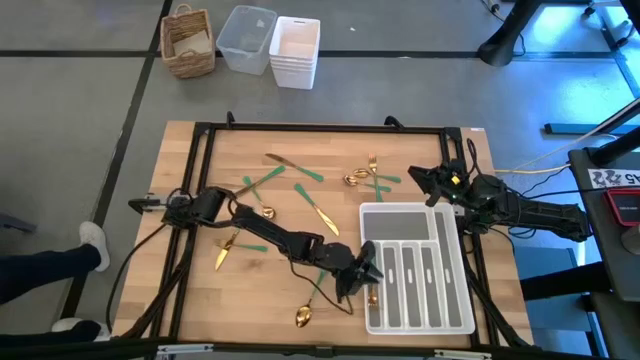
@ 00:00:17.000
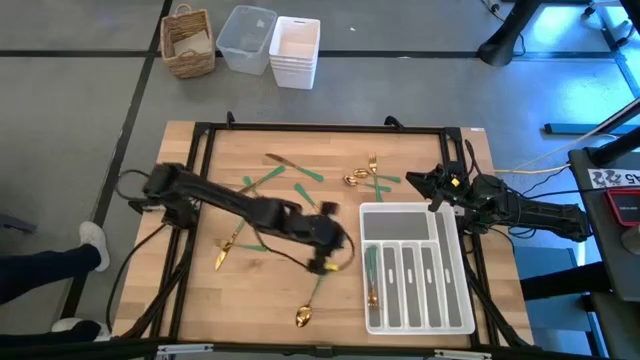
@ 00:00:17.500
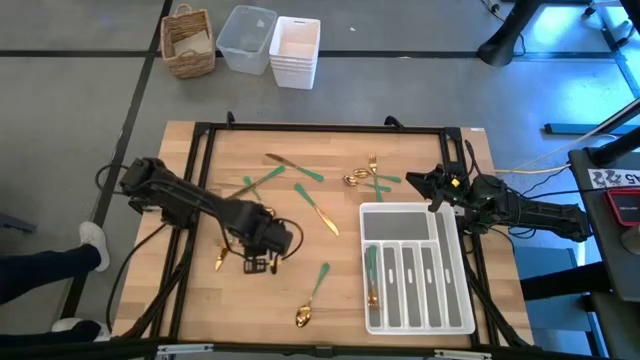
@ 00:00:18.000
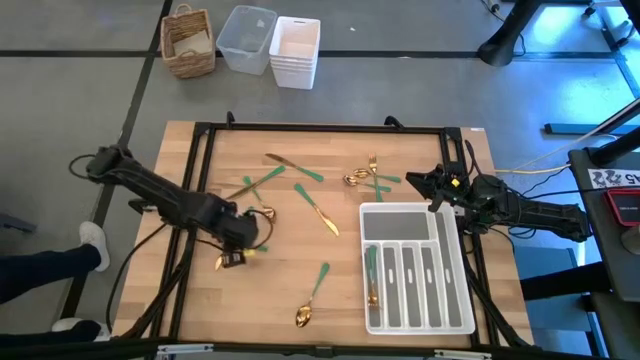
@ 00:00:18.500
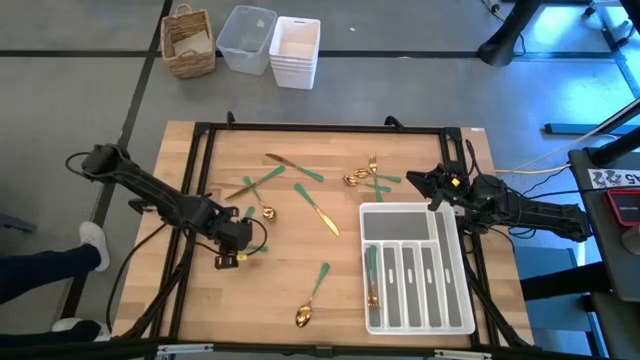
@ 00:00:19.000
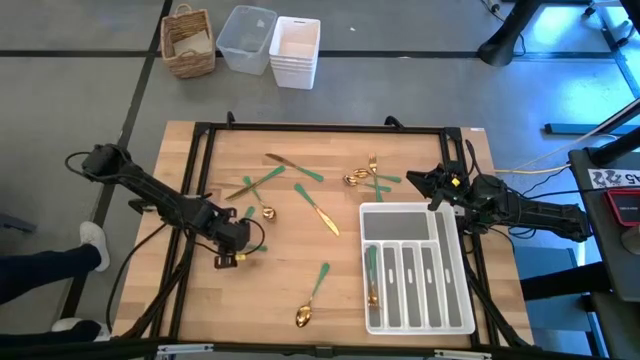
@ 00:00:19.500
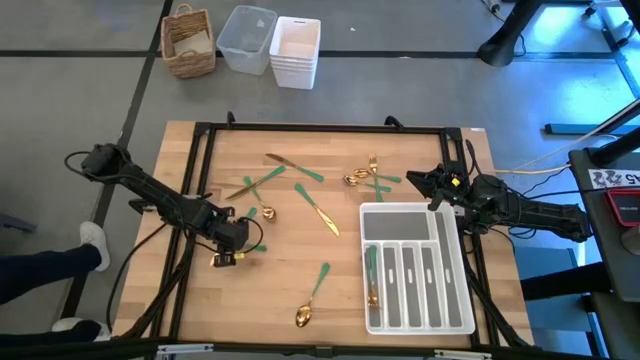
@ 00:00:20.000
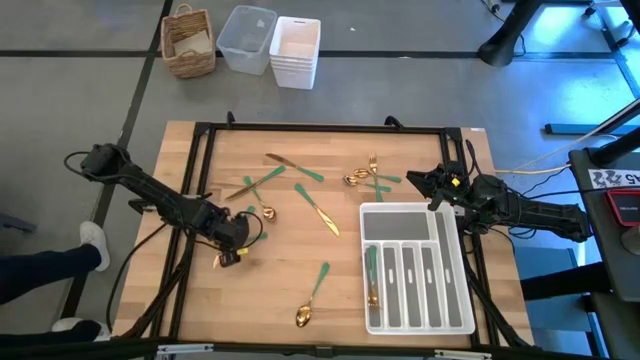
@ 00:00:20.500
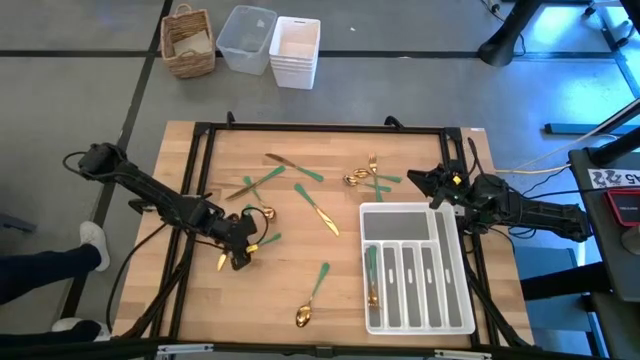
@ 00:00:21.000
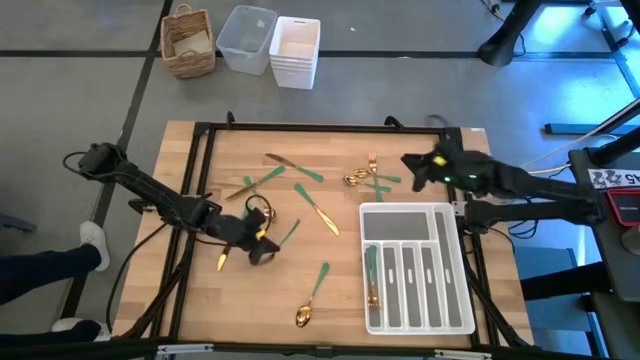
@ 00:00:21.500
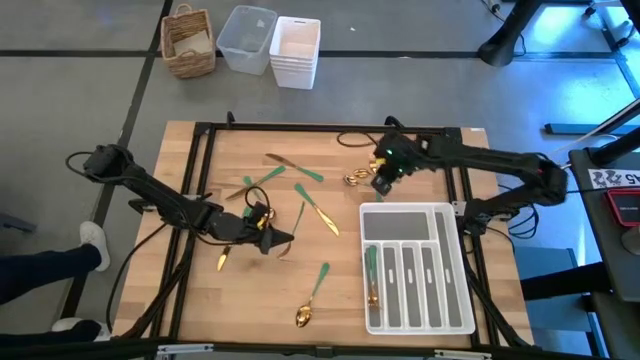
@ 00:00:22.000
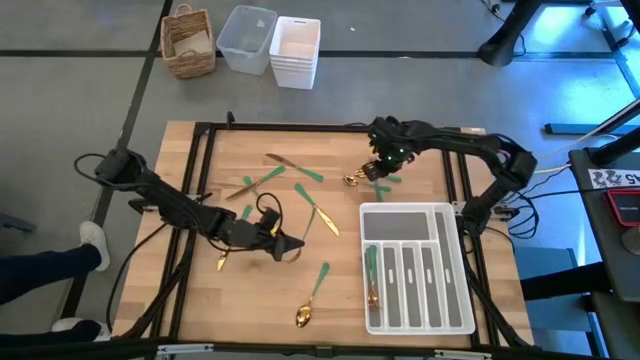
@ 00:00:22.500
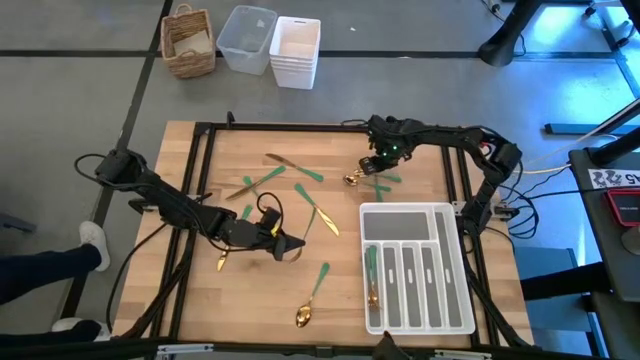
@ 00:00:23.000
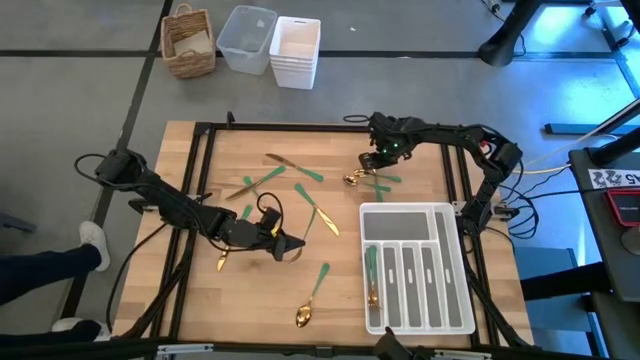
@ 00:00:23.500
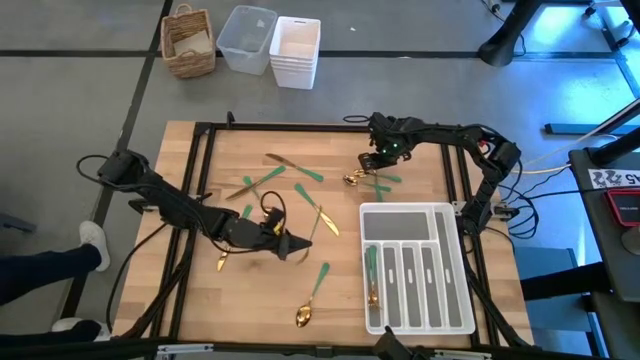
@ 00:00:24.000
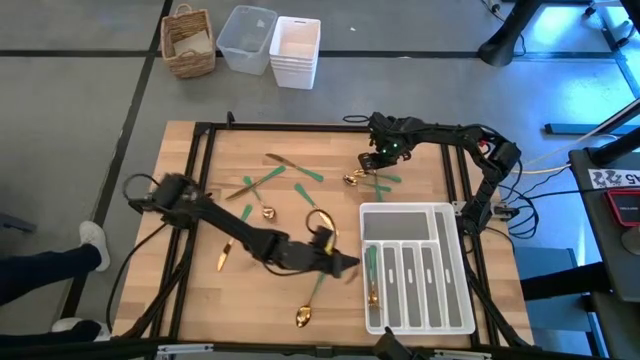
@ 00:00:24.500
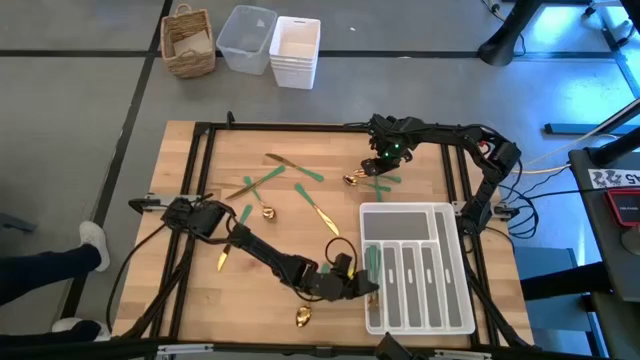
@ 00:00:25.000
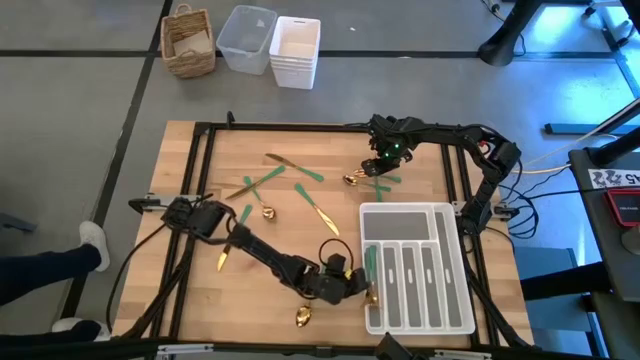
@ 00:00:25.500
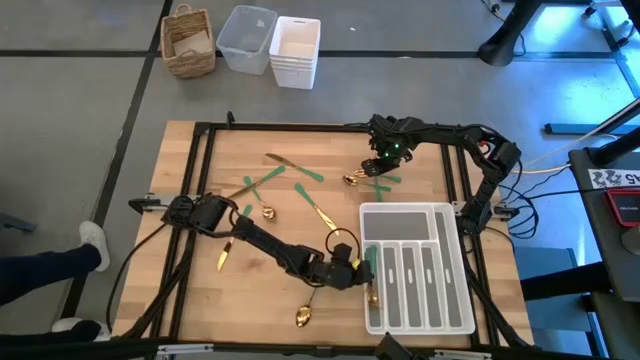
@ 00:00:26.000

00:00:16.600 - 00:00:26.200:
Task: Sort silverware
Put the green fork in the white silverware tray

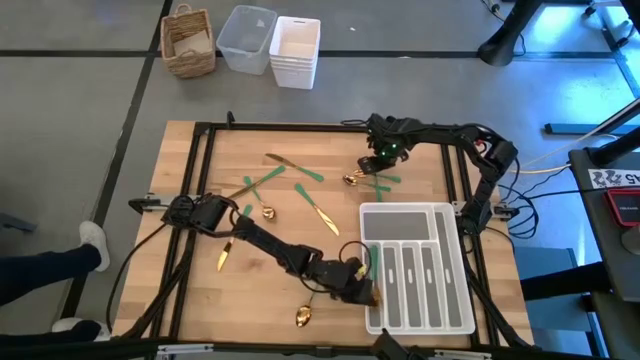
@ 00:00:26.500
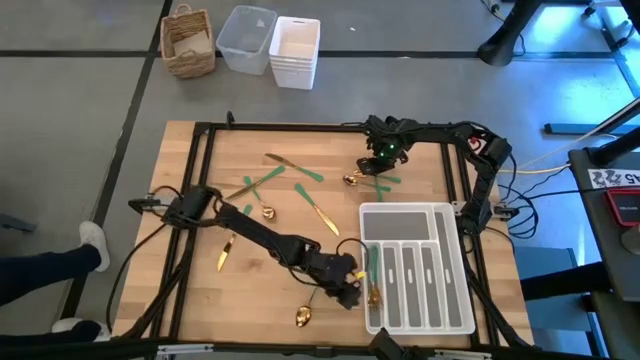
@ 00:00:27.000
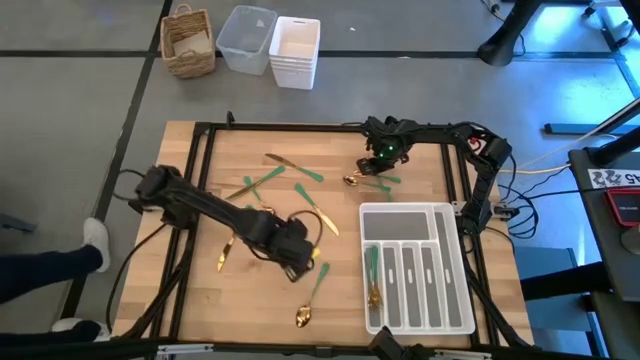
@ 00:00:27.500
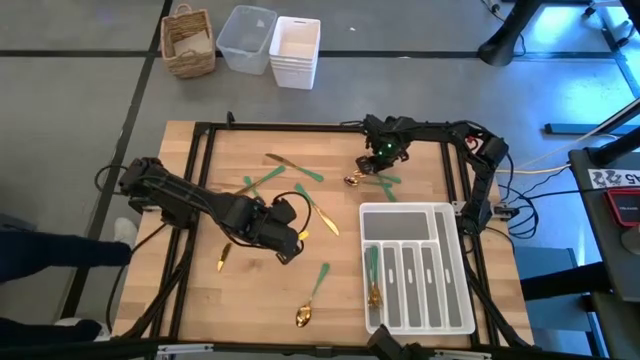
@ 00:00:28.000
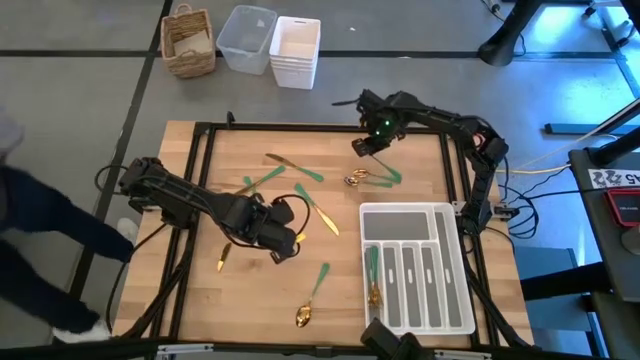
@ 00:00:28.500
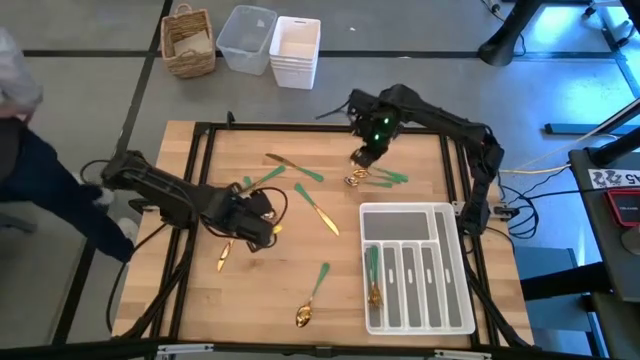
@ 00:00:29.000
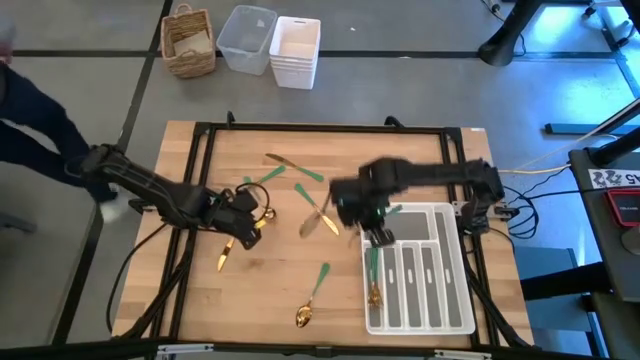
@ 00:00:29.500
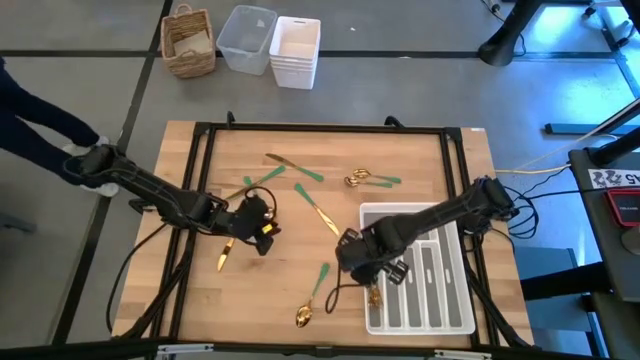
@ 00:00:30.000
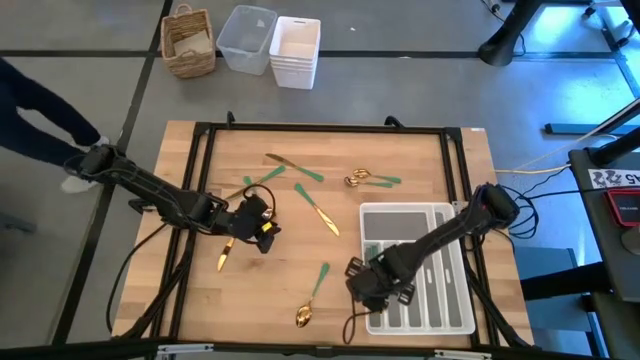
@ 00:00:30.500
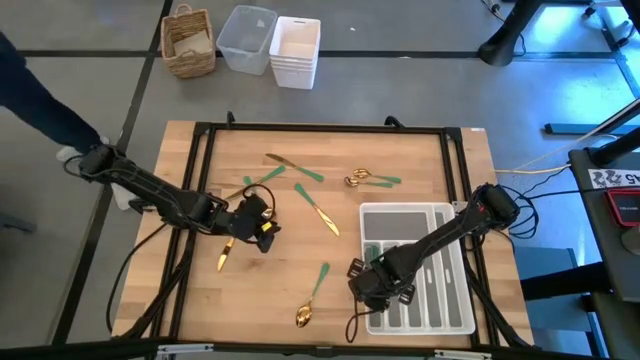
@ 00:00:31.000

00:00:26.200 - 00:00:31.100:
Put the green fork in the white silverware tray

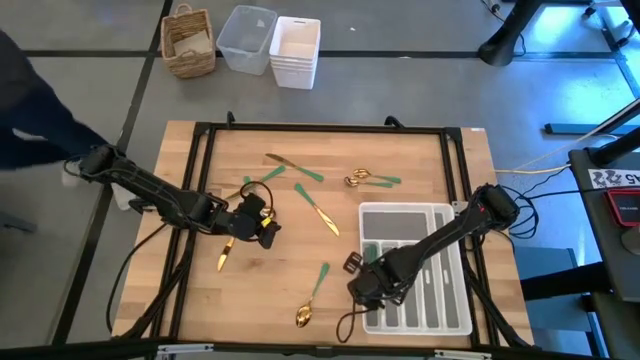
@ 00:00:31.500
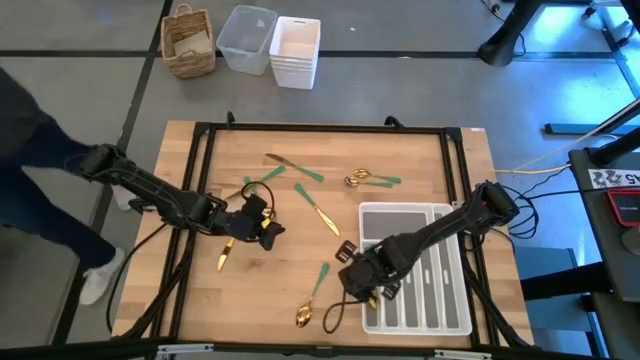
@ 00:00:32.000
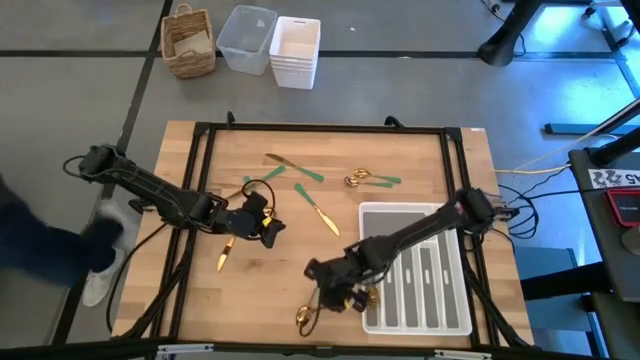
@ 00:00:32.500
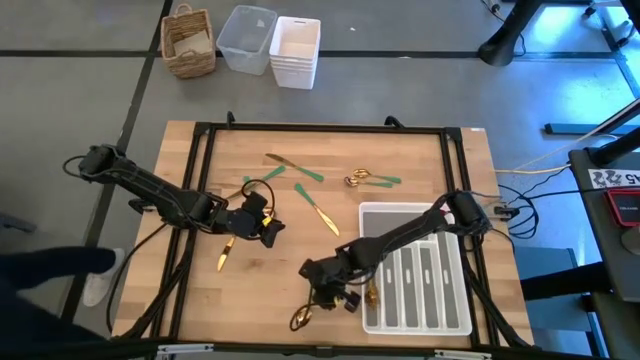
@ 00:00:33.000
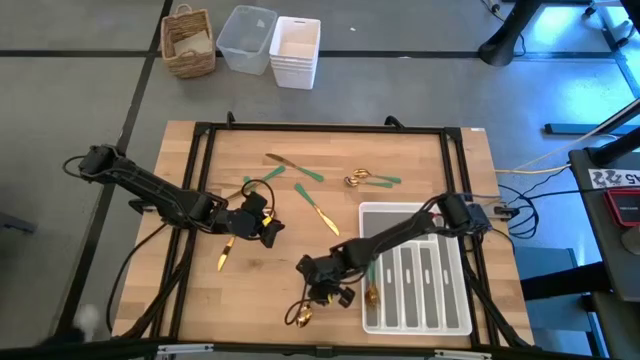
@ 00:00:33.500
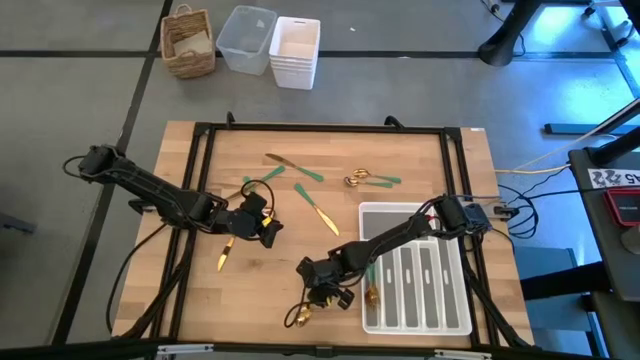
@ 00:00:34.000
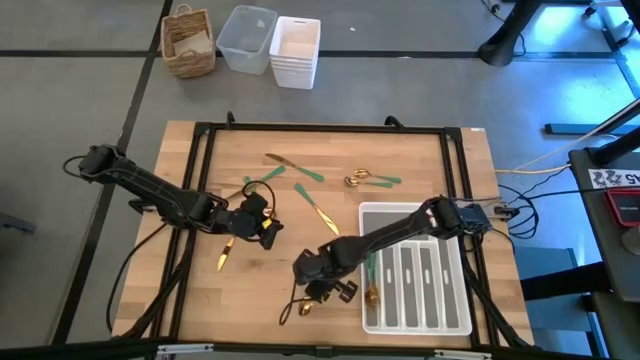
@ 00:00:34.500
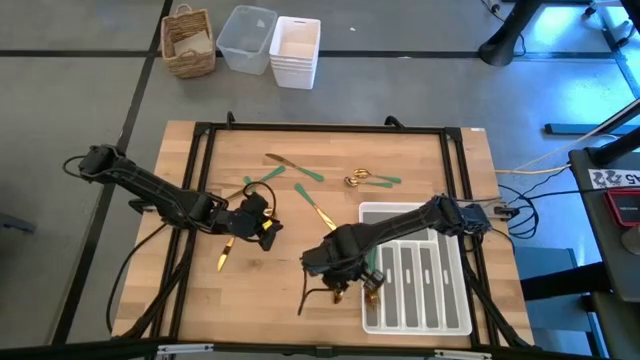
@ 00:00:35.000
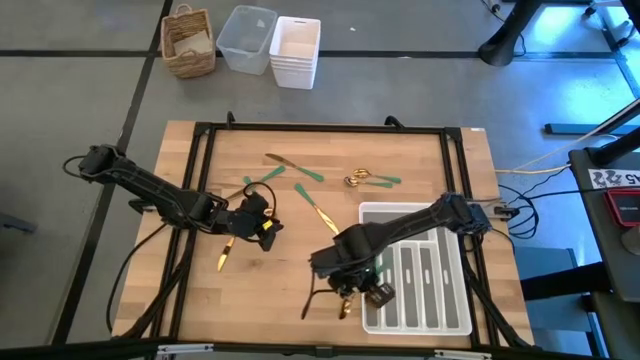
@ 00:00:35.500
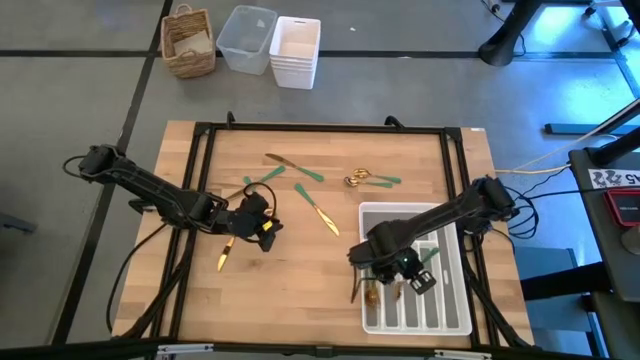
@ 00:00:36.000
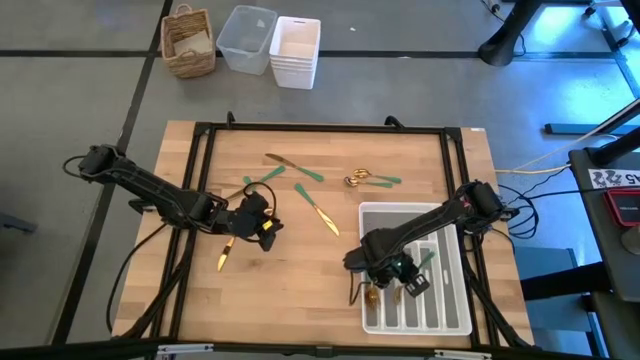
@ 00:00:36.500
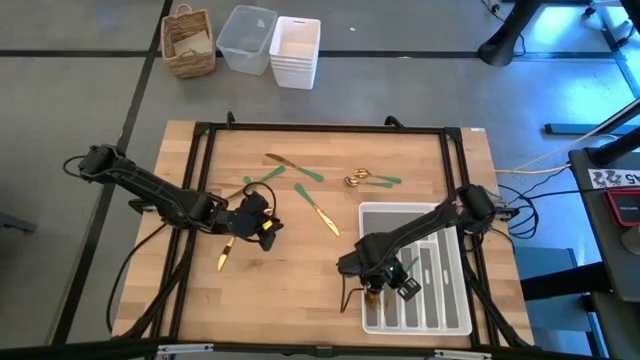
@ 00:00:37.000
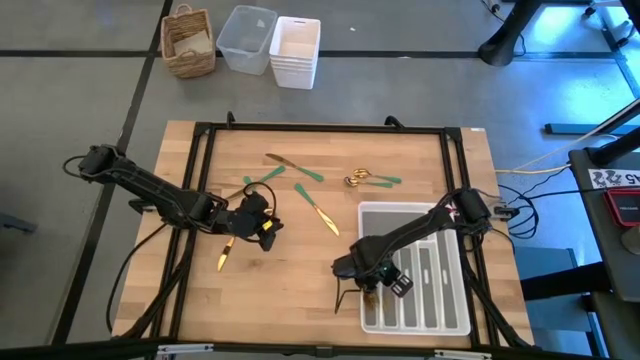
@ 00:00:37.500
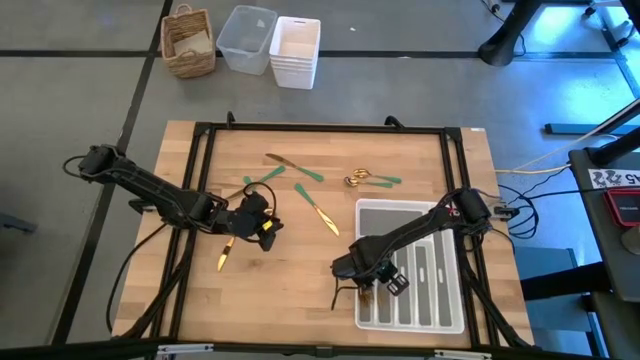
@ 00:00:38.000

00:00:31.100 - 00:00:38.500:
Put the green spoon in the white silverware tray

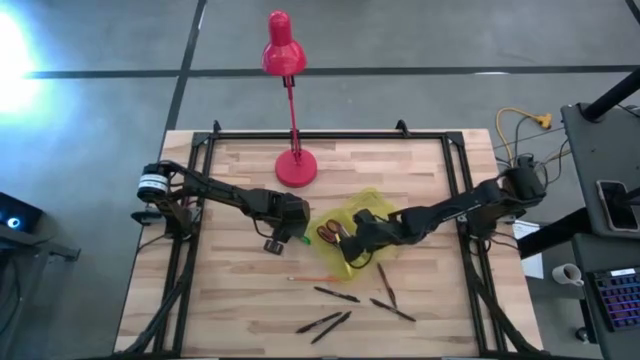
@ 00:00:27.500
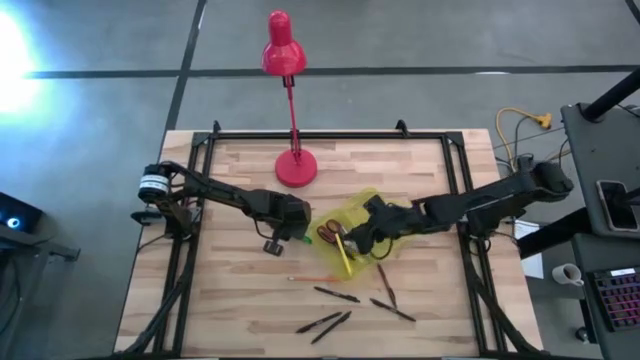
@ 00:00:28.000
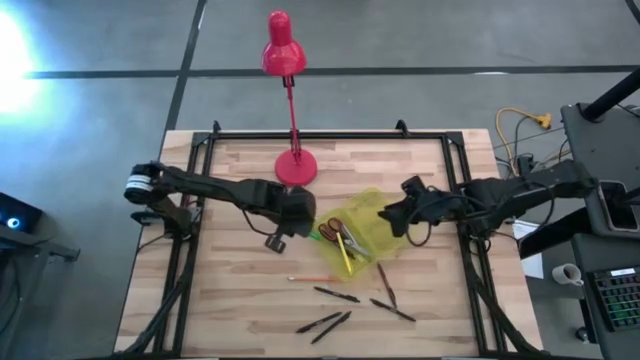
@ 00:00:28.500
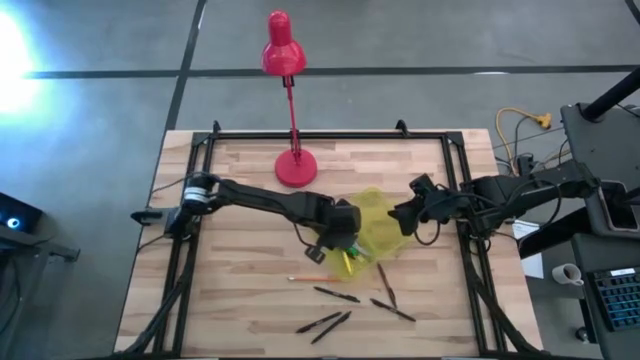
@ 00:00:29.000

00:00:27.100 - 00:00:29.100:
Task: Pick & place school supplies into a supply box
Put the green pen into the yellow supply box
